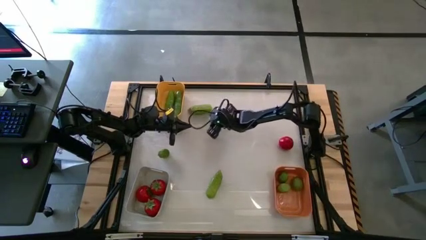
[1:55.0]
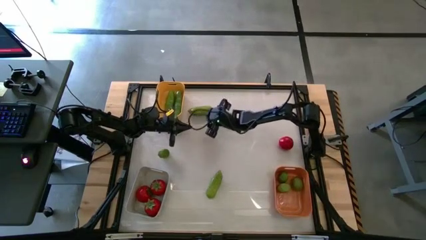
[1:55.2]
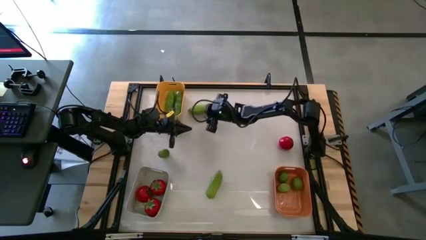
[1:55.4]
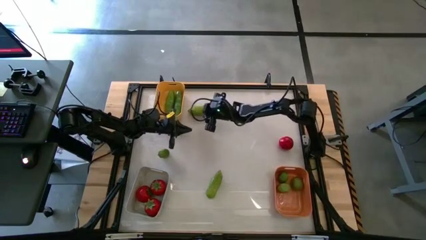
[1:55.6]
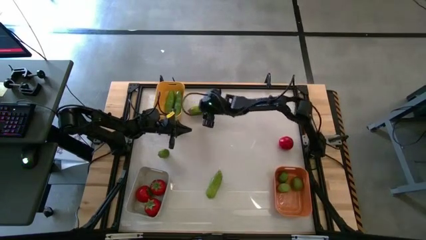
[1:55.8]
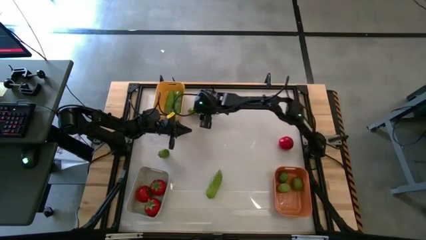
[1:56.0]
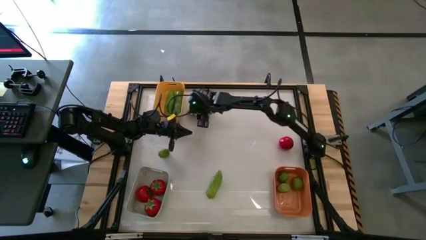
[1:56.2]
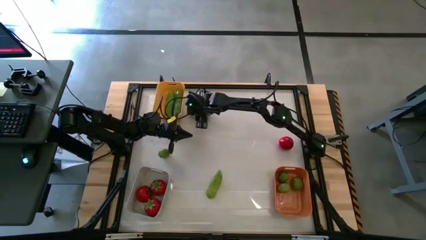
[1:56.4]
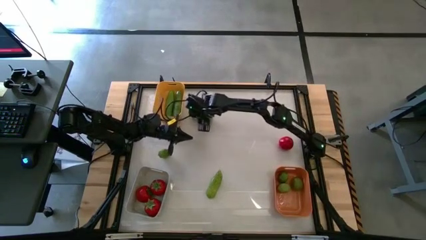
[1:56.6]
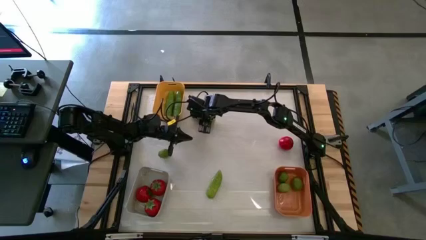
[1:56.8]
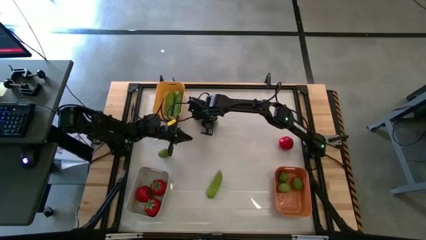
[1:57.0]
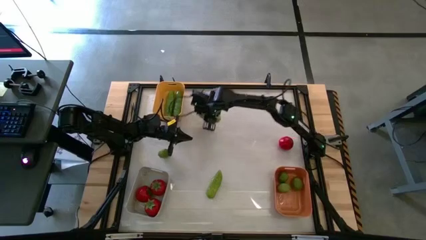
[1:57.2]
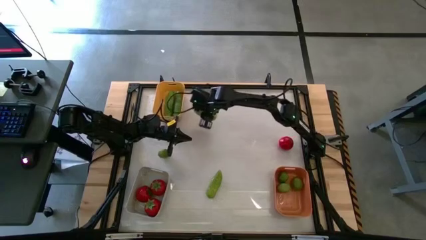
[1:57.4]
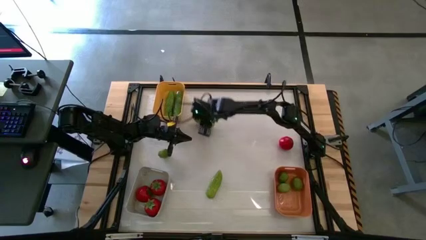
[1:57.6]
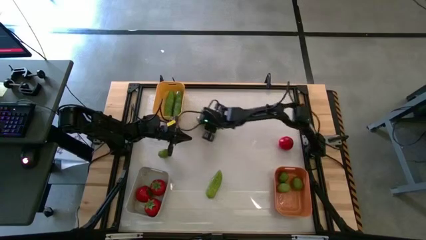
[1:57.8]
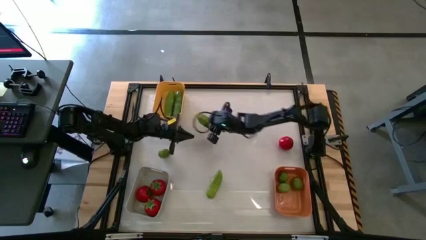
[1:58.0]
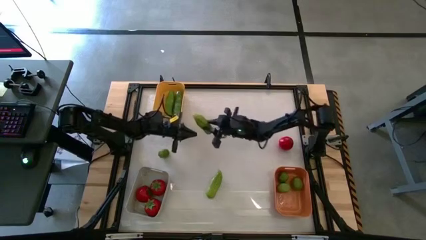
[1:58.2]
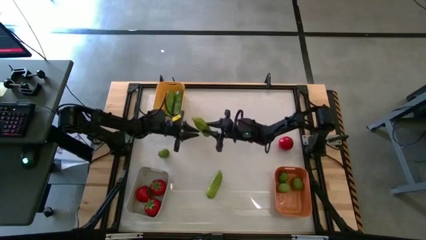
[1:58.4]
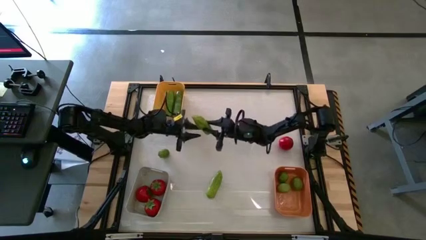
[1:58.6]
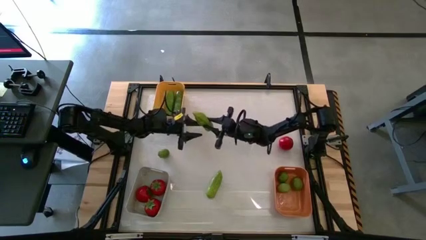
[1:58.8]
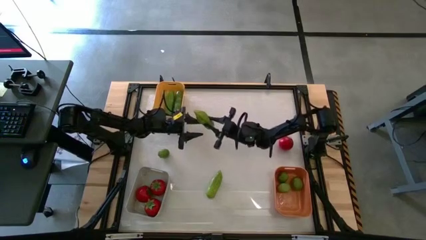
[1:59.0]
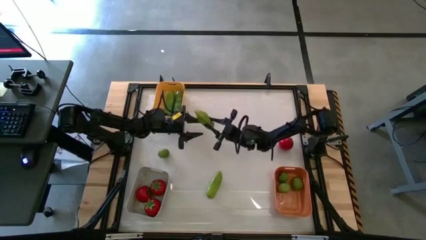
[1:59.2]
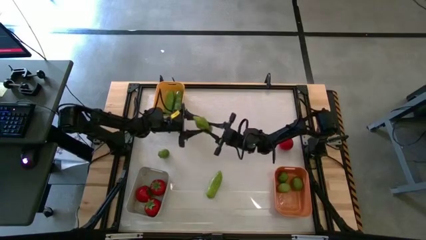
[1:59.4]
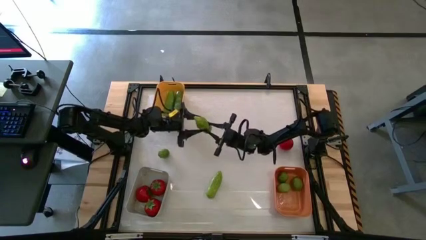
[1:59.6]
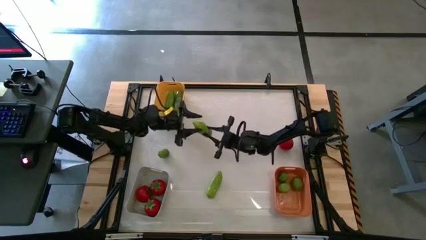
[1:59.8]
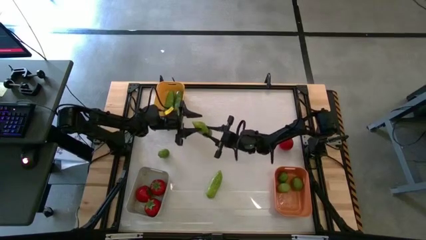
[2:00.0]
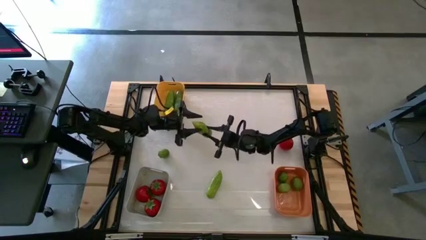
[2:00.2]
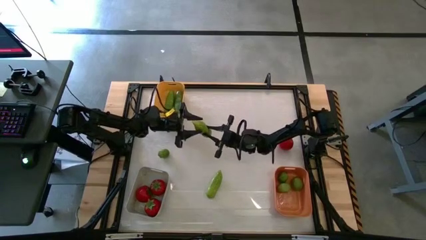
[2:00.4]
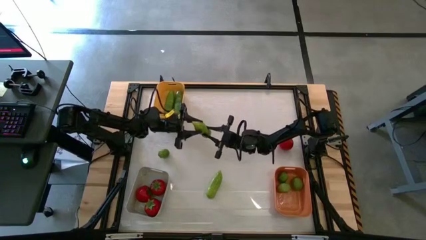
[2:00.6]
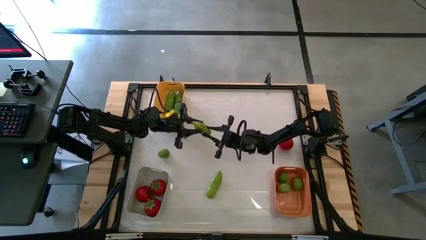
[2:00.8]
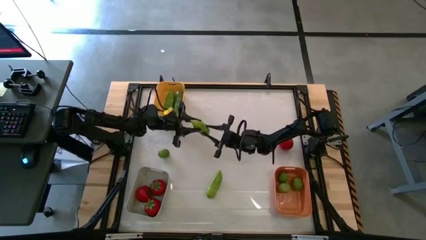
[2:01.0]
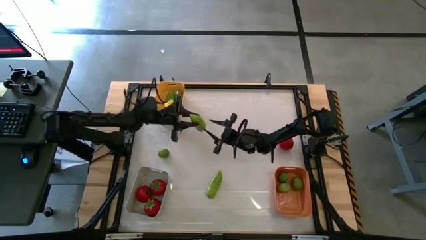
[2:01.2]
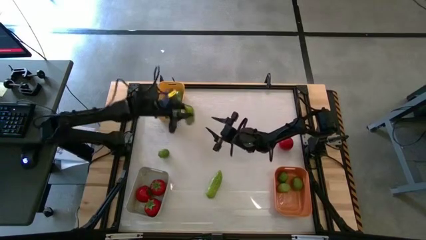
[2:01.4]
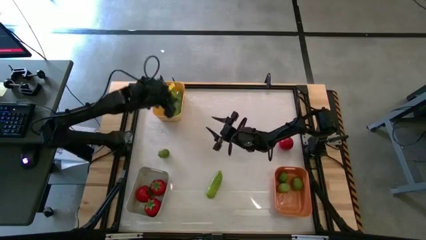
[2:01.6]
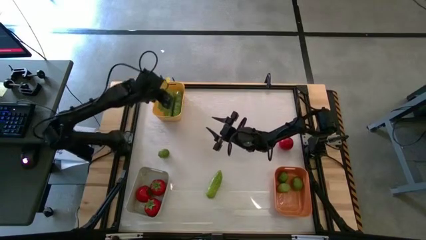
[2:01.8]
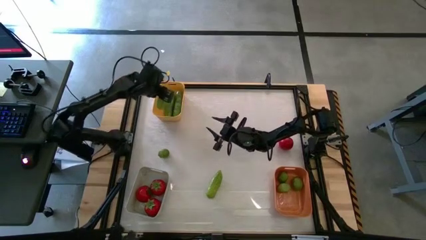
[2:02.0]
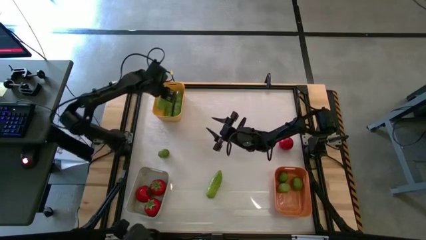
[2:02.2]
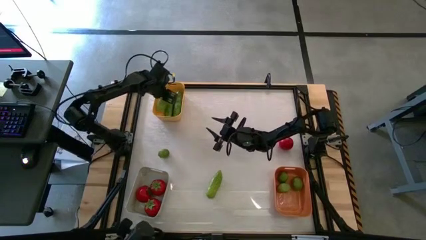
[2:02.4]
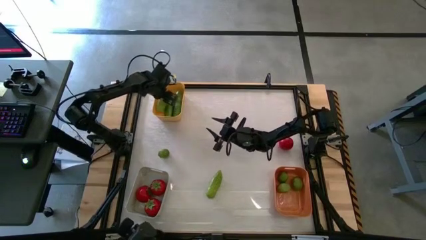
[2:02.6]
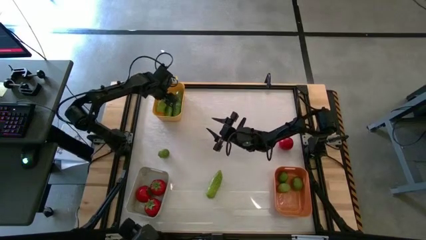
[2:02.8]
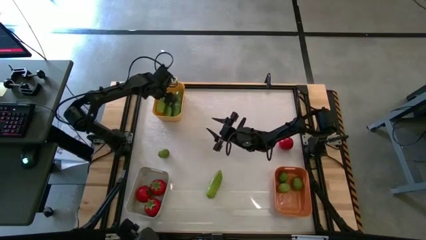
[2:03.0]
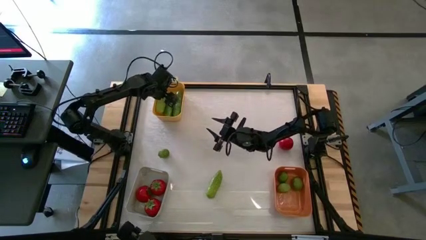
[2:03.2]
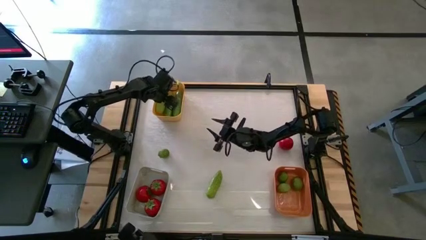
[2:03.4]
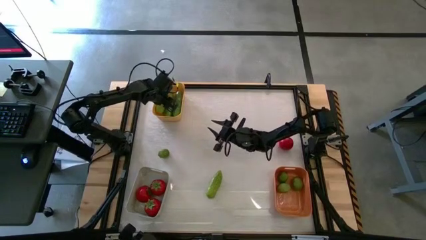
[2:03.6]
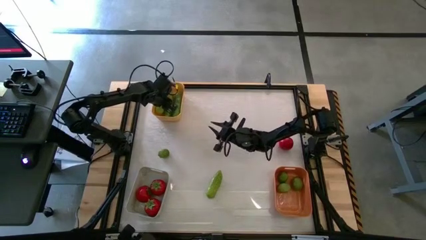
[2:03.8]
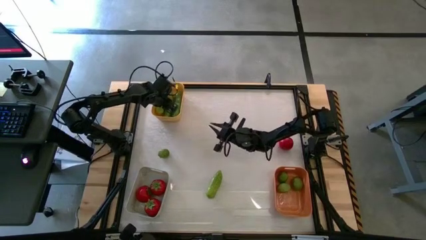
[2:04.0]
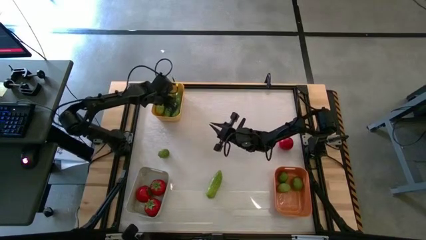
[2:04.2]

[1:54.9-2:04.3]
Task: Sort produce into baskets
Put the green cucumber into the yellow bin

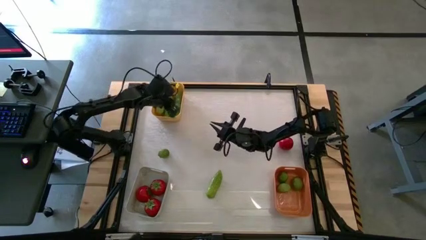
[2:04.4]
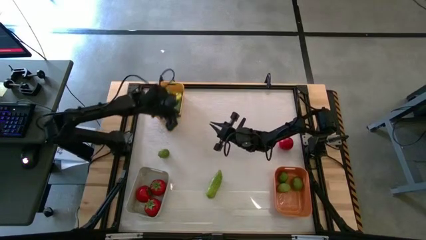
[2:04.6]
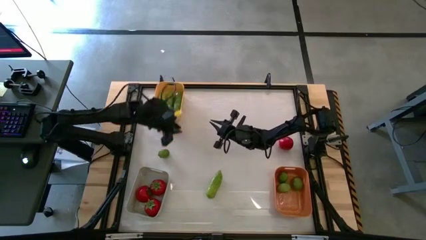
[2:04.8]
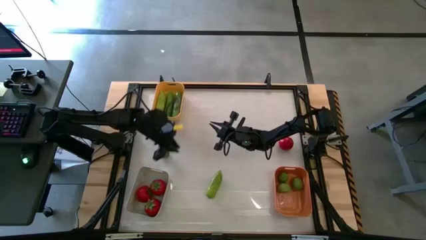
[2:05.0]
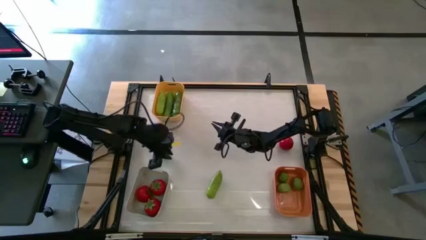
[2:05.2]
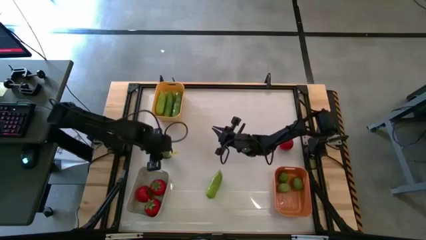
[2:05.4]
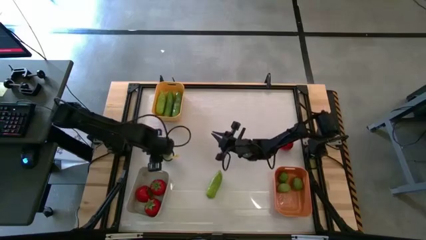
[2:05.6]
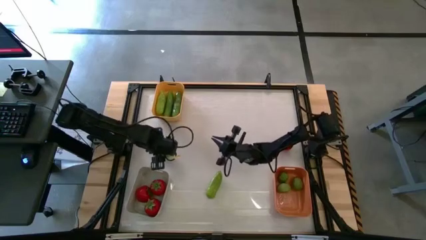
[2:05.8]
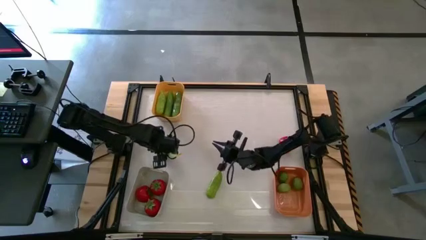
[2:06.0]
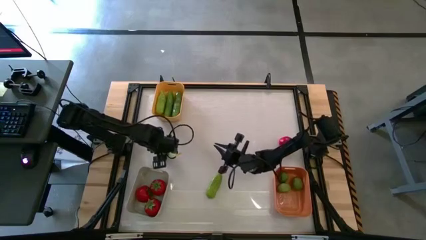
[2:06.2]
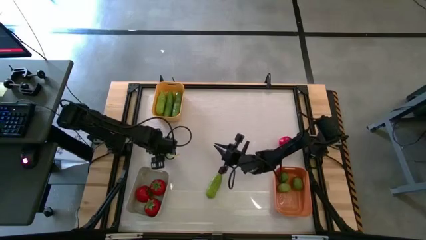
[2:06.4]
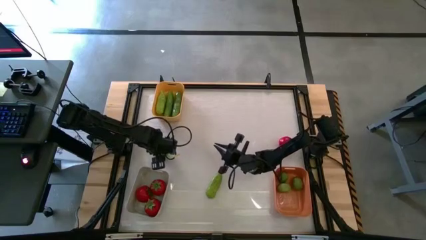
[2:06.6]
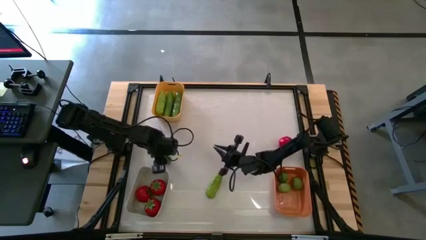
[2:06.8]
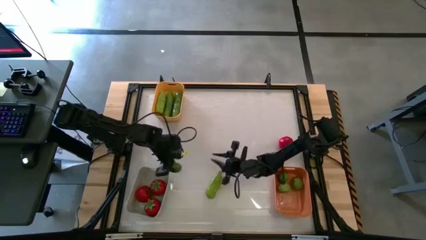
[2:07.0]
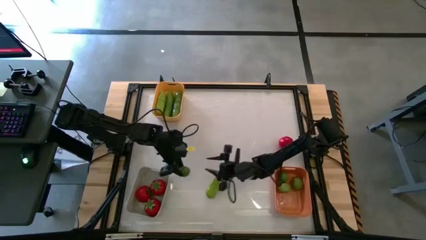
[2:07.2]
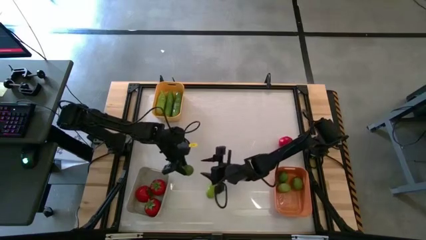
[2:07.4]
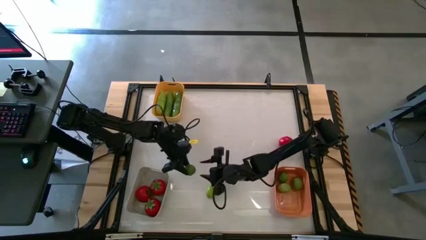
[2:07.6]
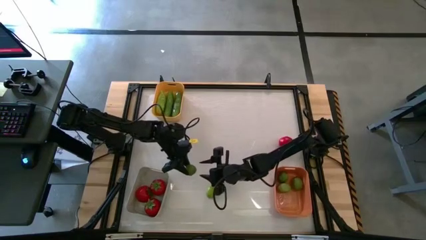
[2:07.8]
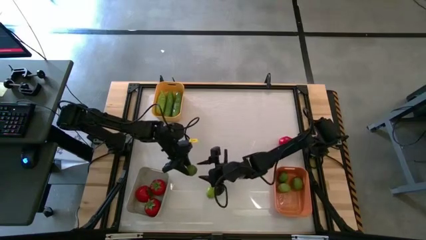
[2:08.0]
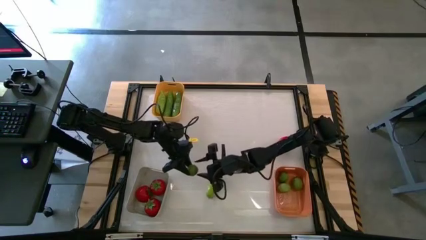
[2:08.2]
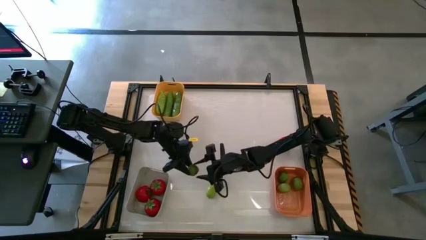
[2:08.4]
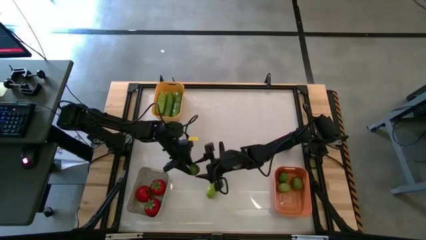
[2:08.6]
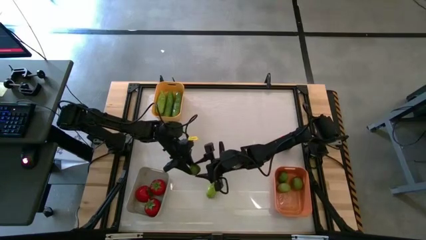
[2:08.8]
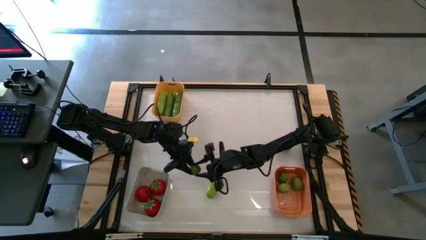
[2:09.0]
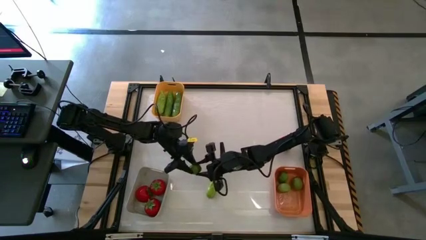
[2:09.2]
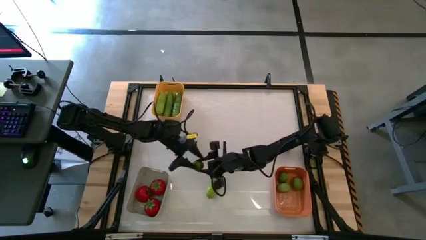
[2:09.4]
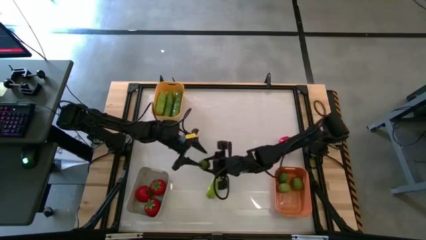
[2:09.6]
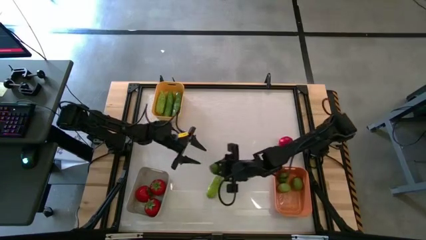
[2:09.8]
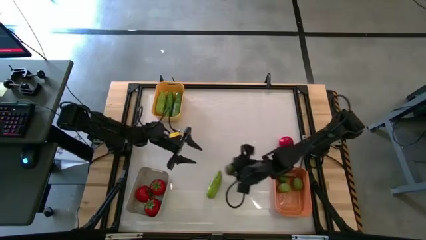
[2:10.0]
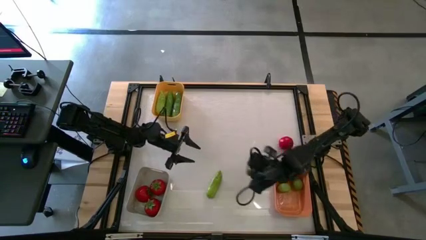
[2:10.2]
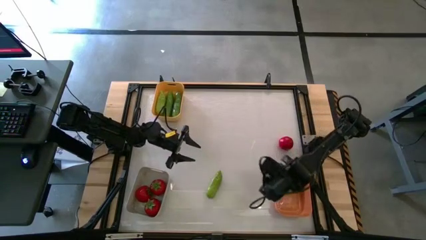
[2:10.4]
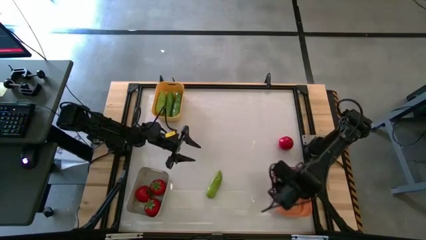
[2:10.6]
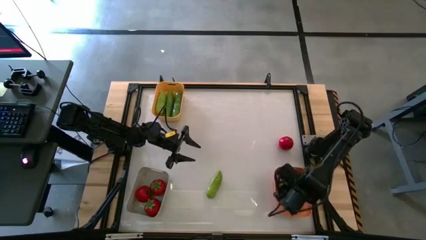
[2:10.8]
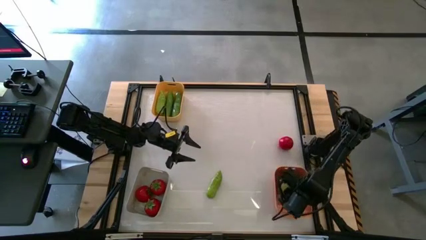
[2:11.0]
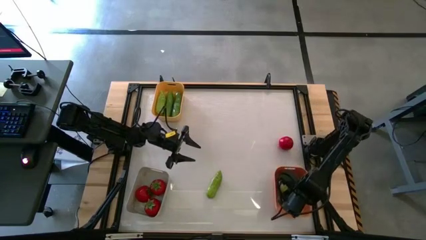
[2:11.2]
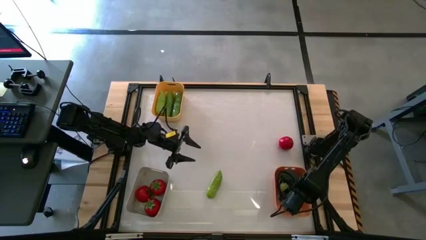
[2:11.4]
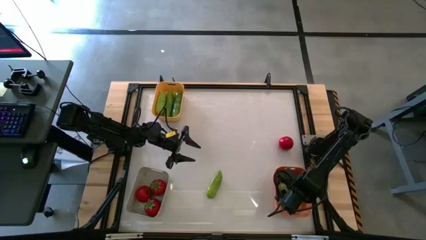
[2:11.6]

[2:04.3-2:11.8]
Put the green lime into the orange bin
